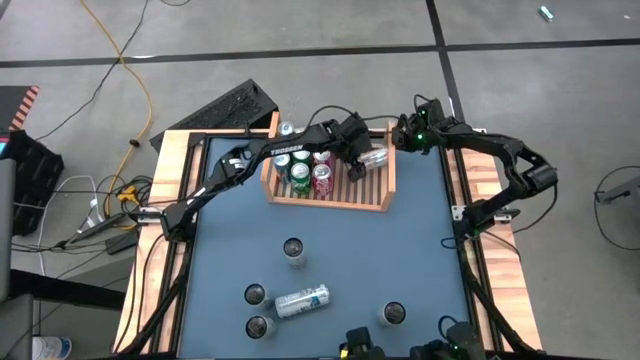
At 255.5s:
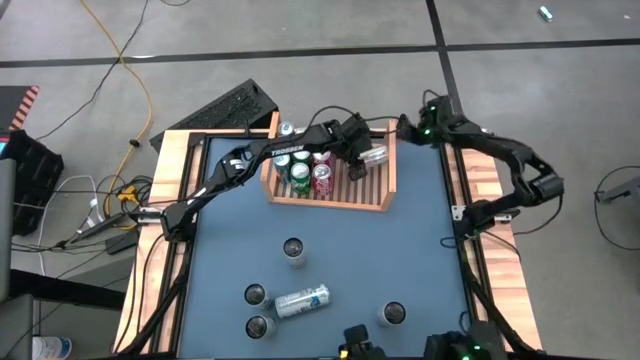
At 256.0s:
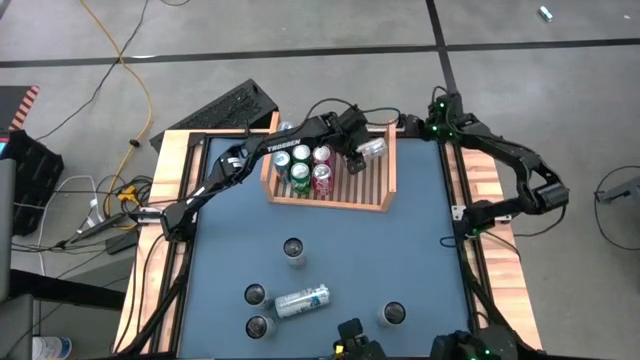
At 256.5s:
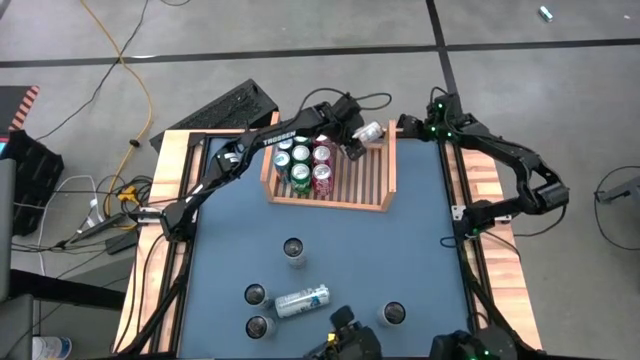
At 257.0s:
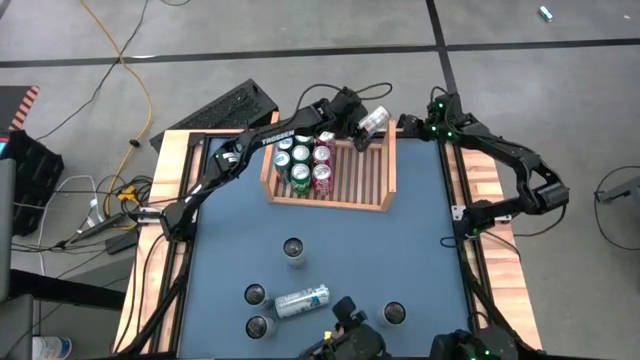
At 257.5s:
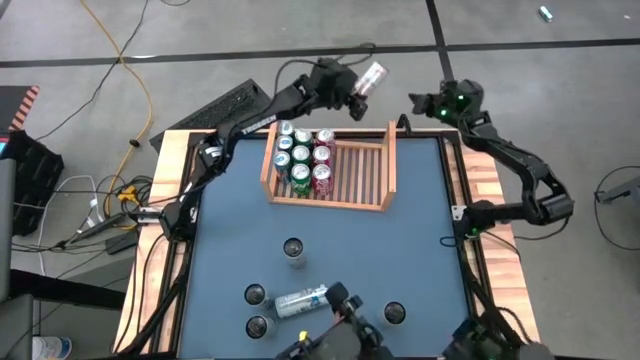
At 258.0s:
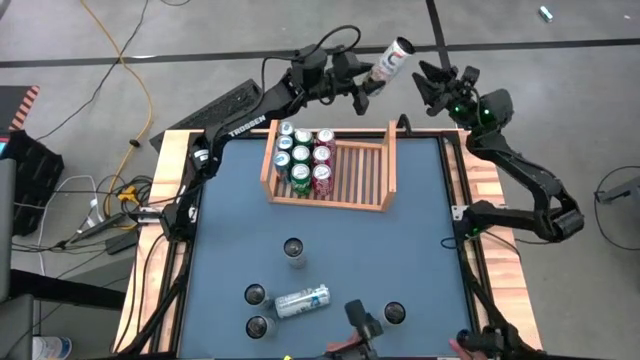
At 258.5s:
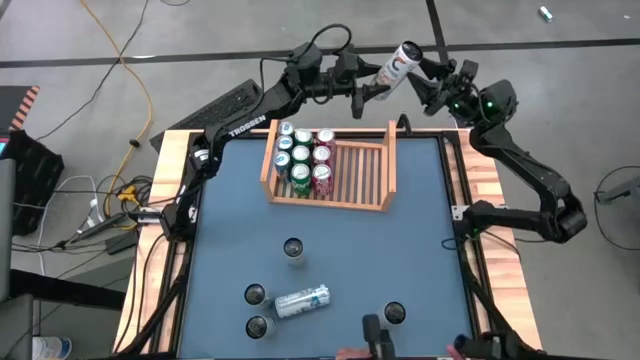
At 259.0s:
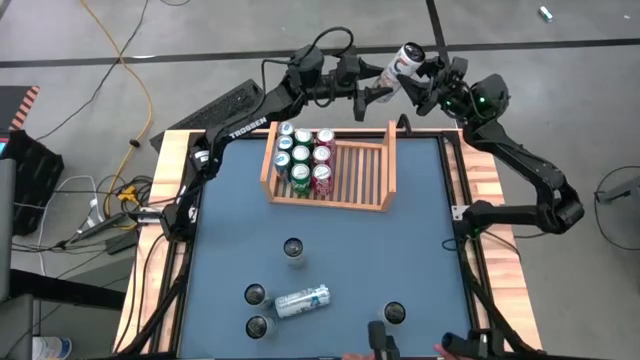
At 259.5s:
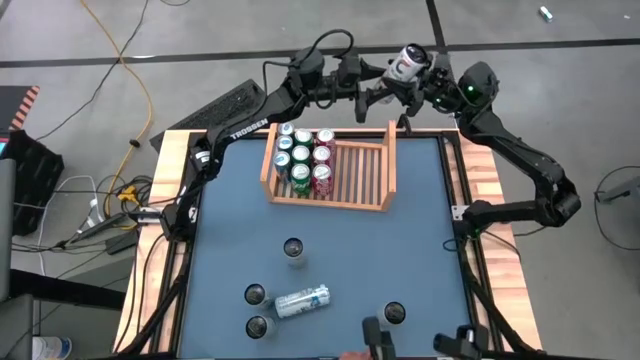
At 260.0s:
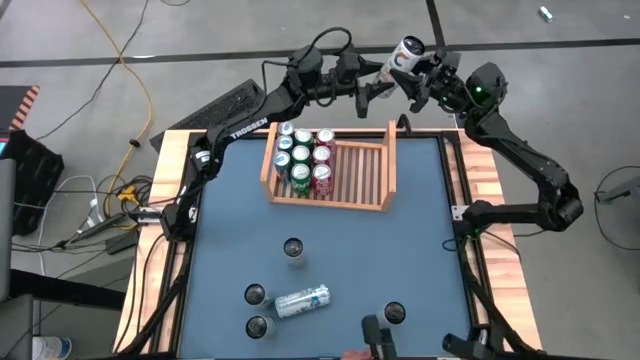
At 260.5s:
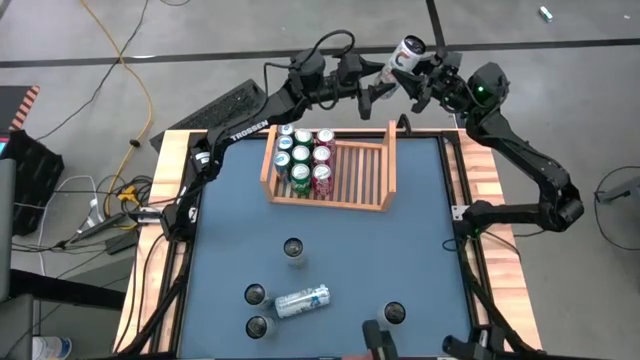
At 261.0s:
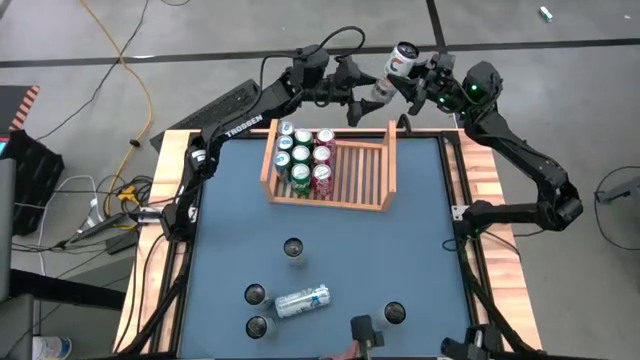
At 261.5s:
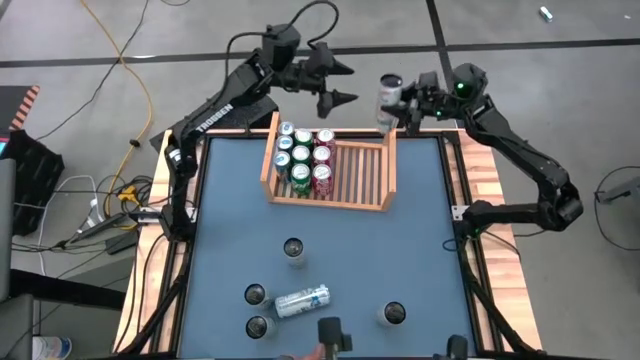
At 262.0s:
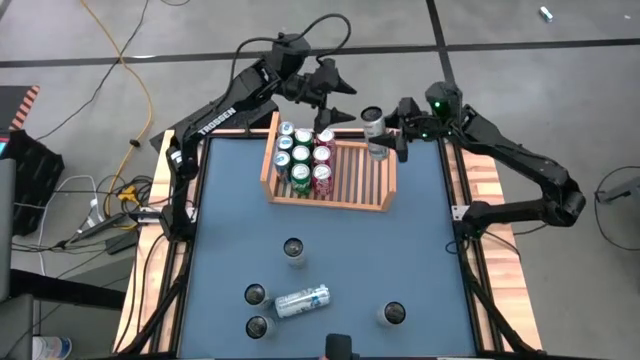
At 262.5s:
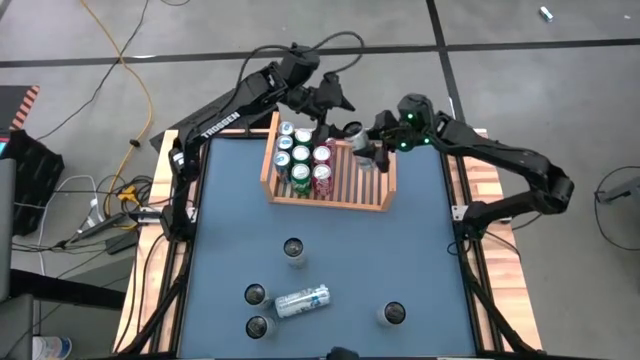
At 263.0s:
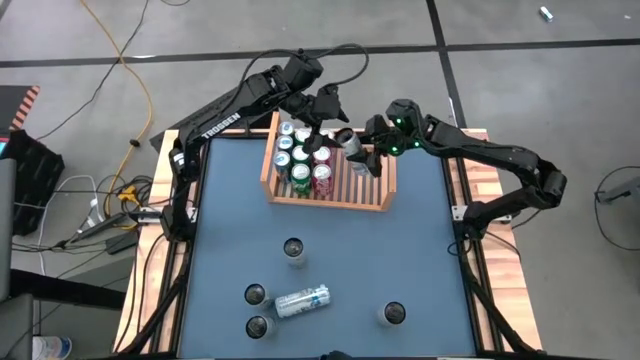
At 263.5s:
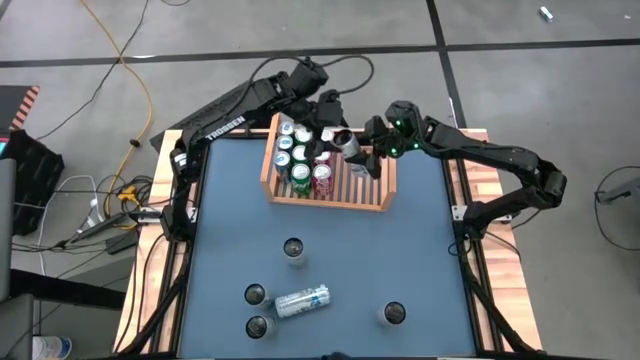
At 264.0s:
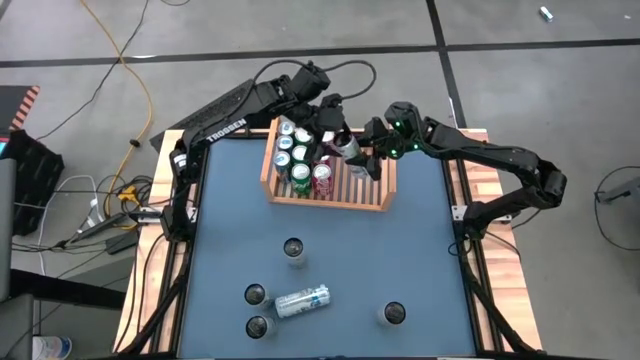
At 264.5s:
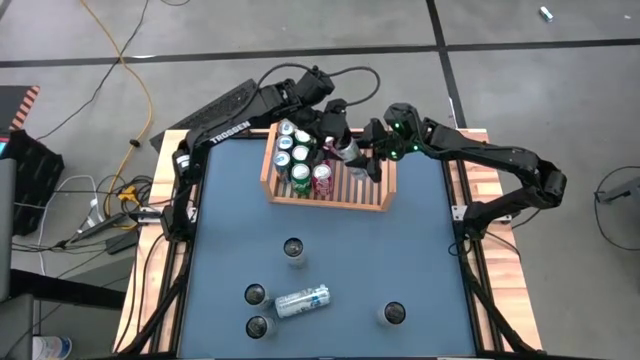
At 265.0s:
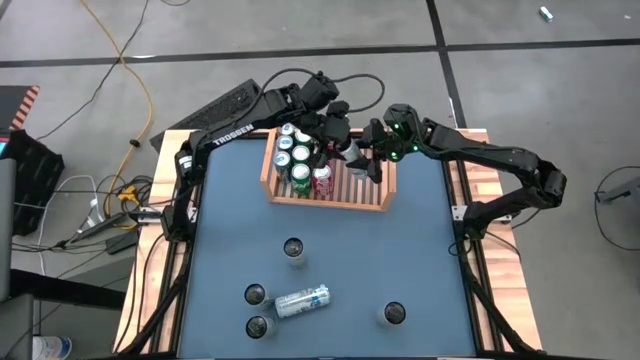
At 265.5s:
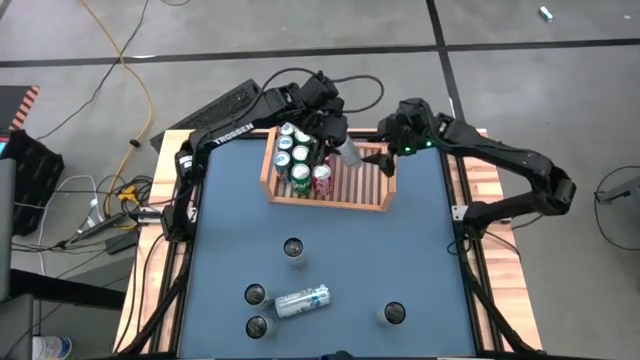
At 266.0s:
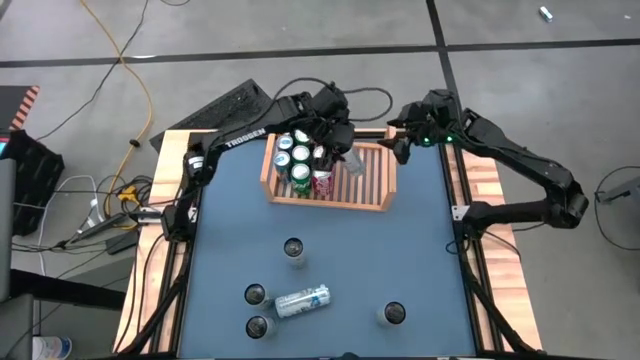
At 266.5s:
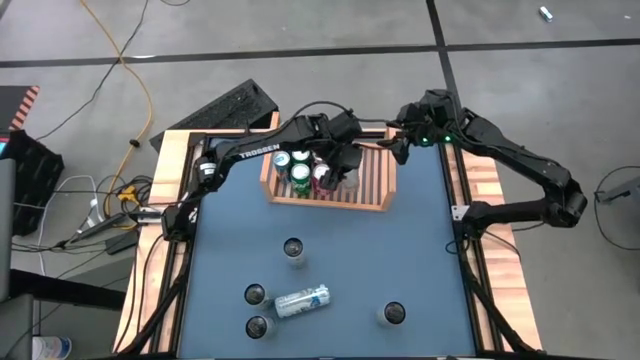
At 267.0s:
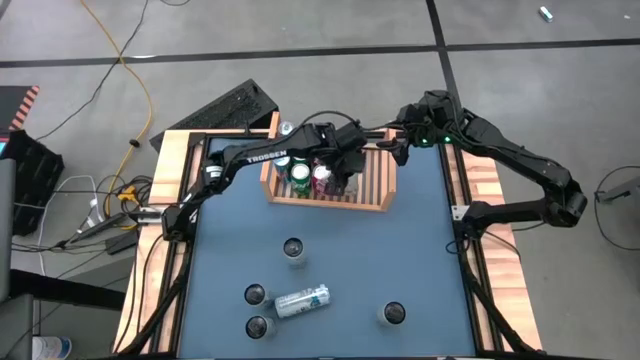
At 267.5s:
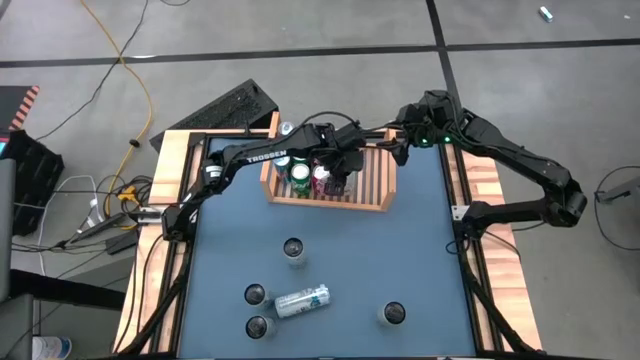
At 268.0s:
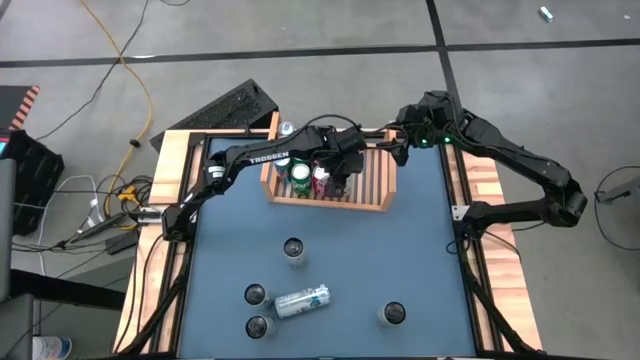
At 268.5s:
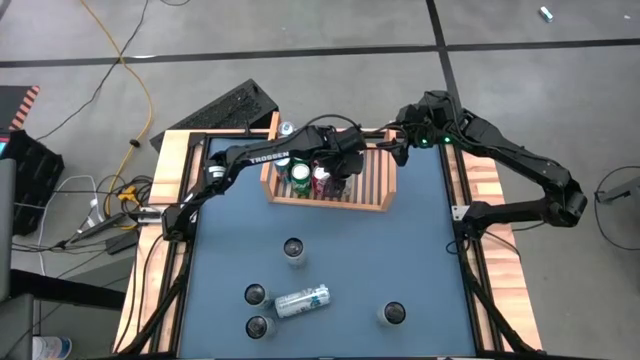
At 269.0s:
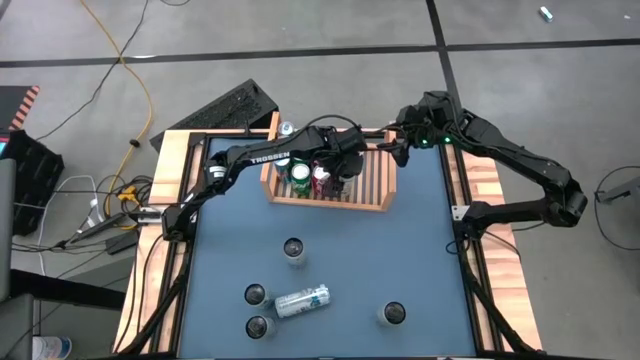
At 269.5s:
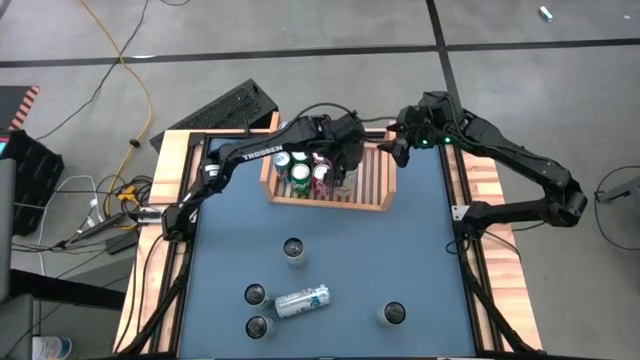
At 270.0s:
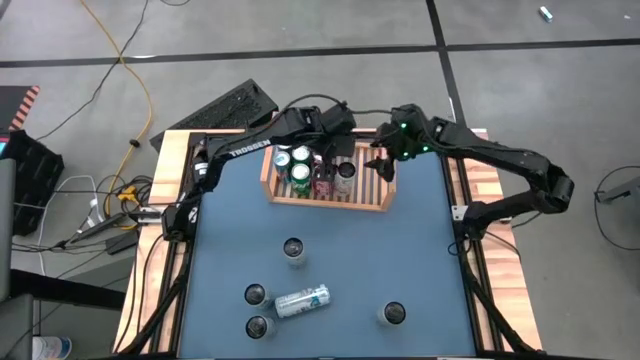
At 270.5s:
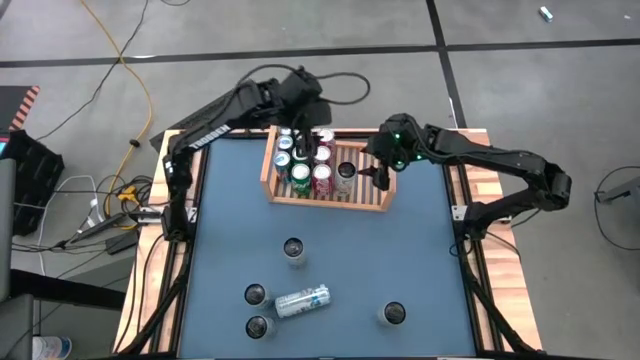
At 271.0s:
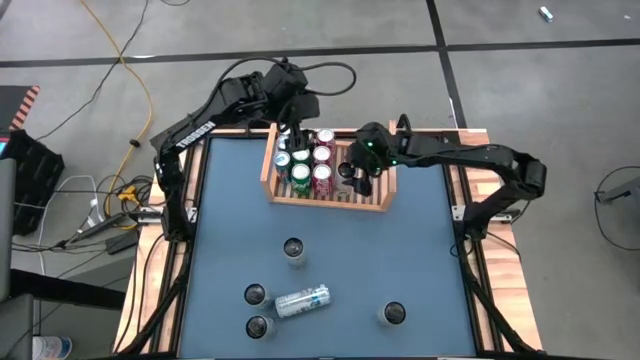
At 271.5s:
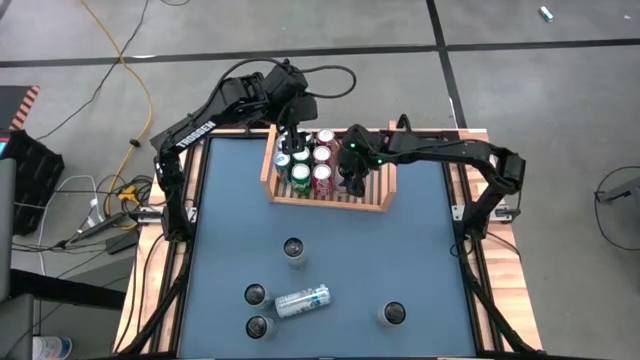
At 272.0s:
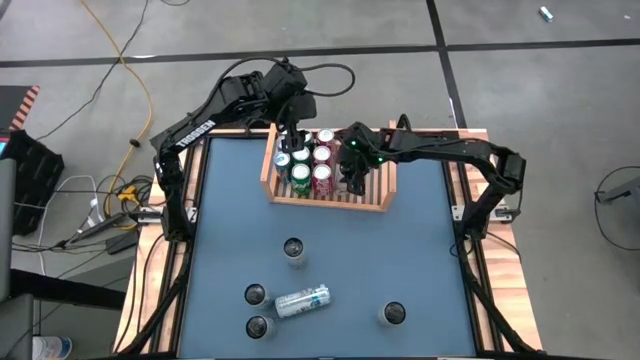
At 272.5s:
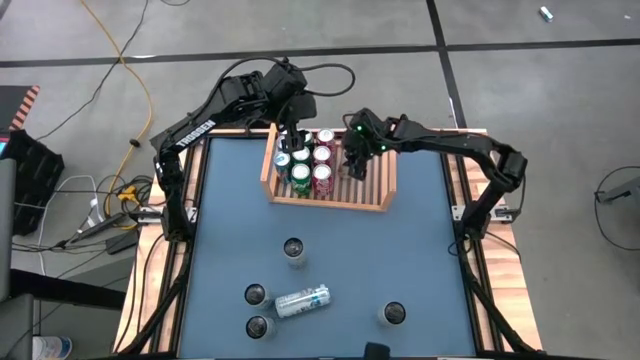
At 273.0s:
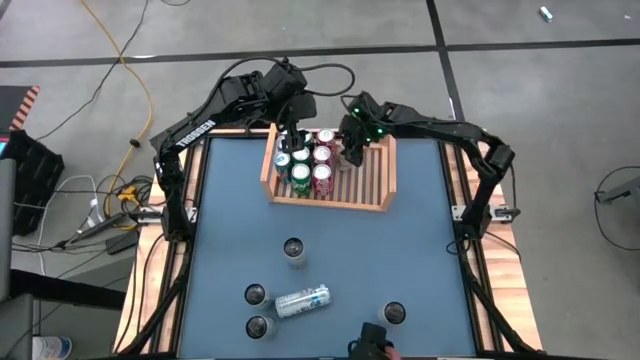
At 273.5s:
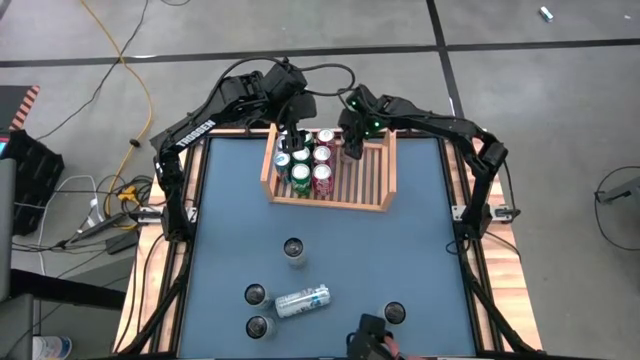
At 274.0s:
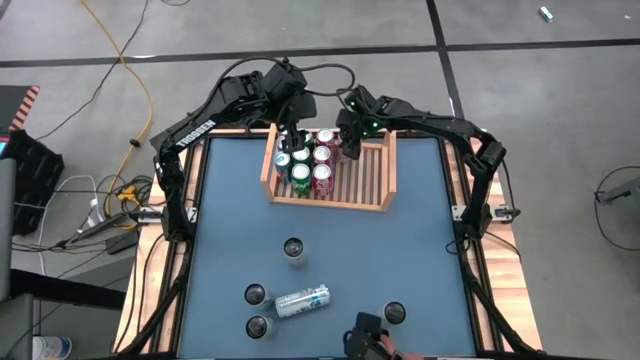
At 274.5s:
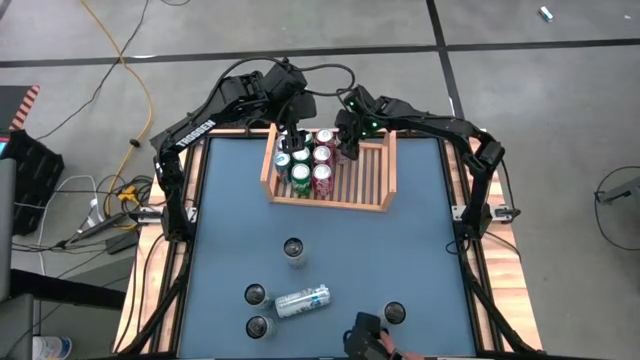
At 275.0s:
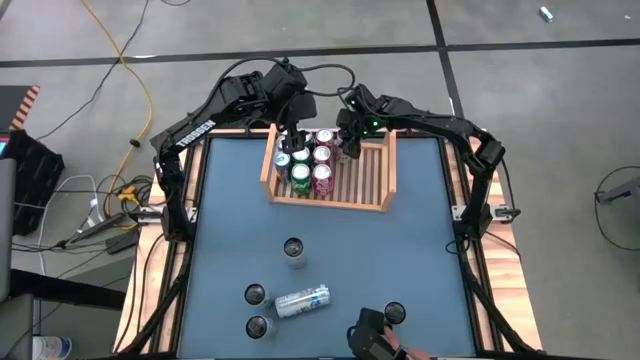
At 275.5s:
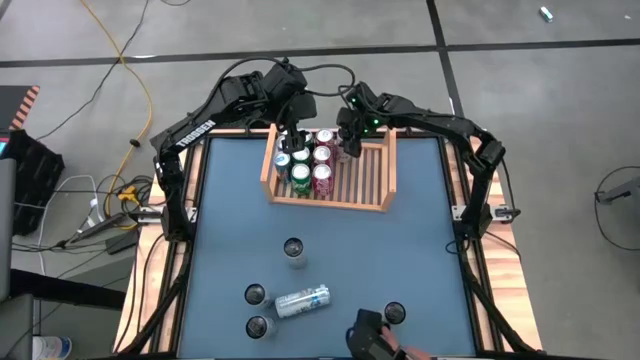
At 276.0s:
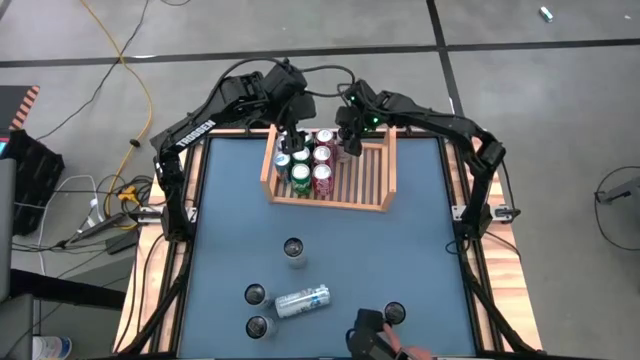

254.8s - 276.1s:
Task: Place canned beverage on shelf
Put the light yellow soda can on the shelf

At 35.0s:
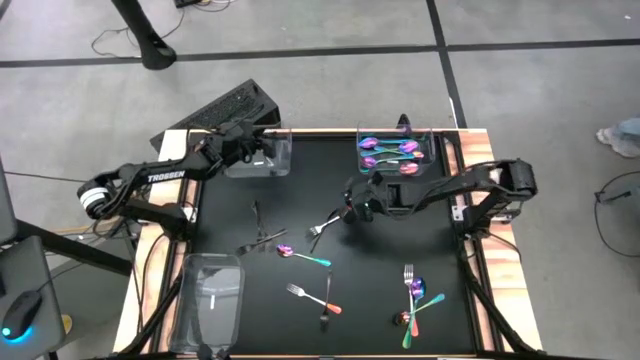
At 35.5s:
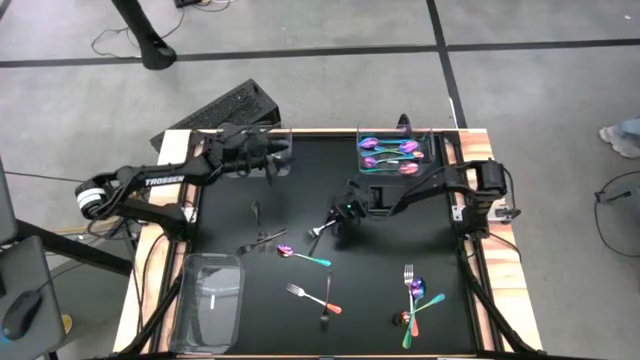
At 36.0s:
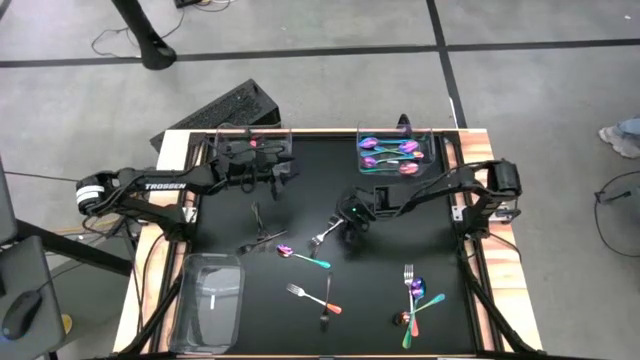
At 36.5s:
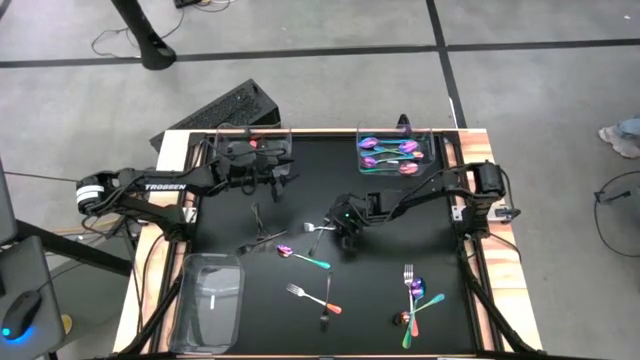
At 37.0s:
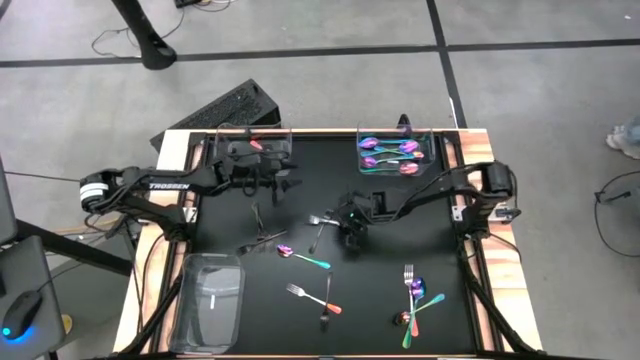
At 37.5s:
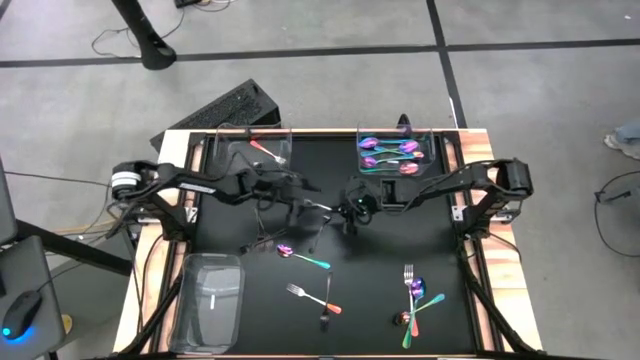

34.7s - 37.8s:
Task: Sort silverware by color (type)
Put the orange fork into top left transparent bin
